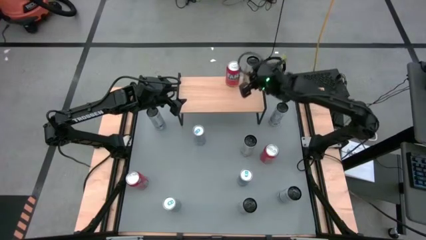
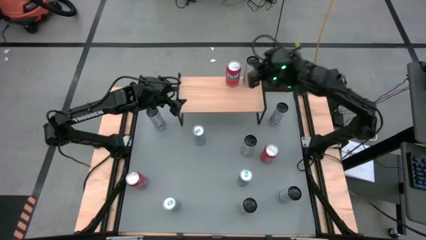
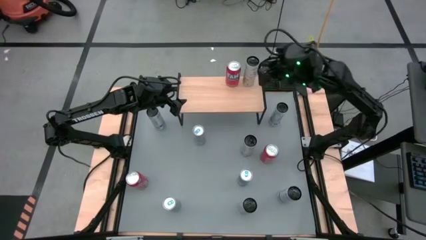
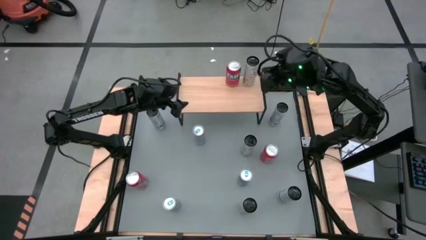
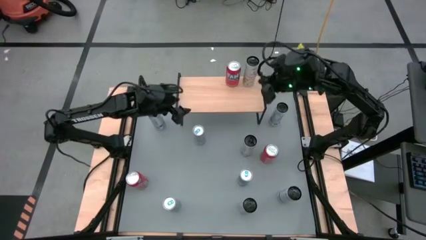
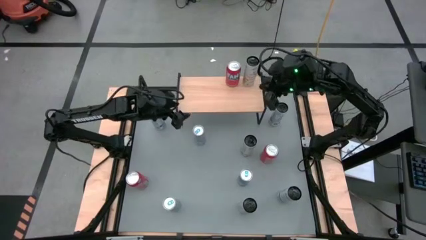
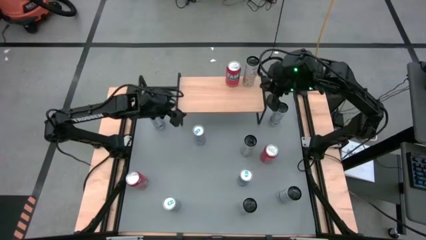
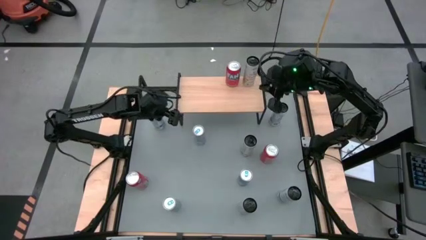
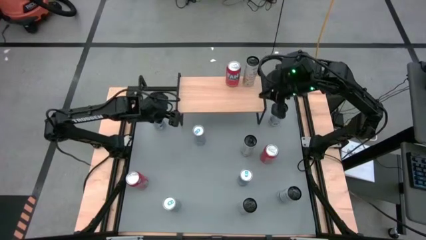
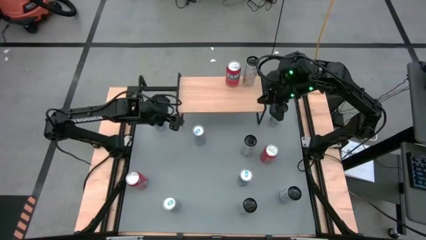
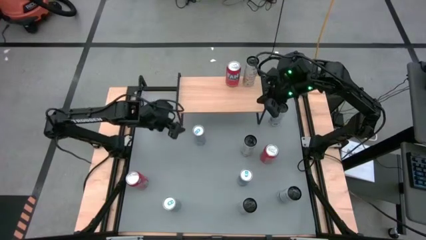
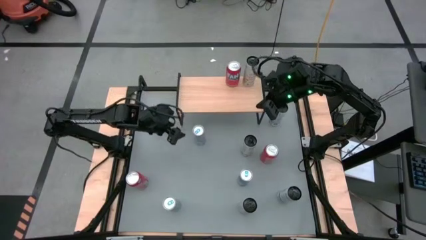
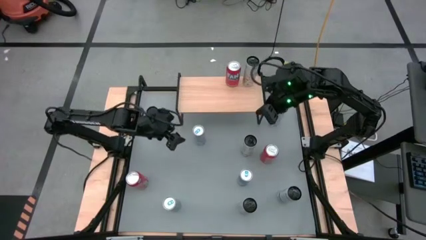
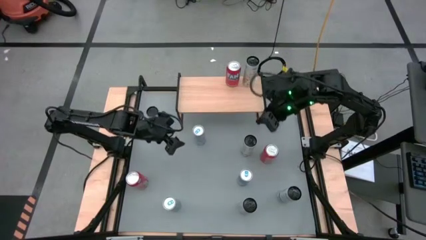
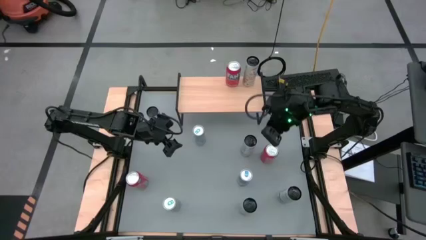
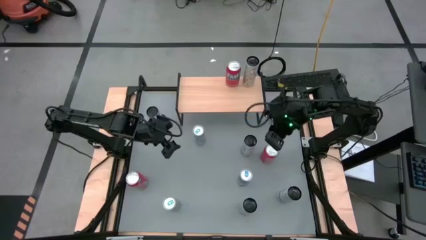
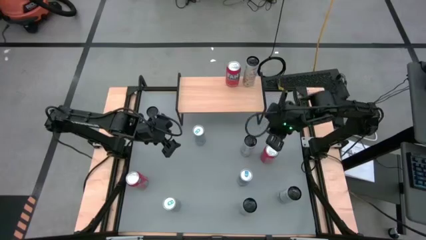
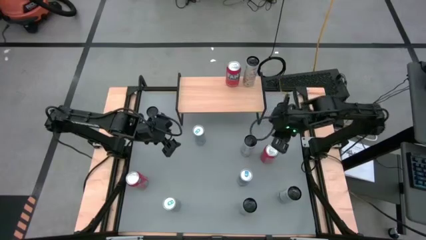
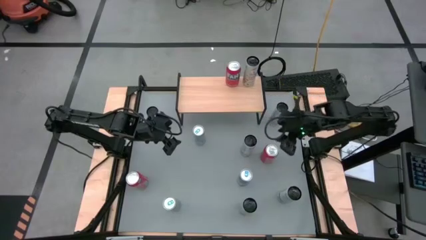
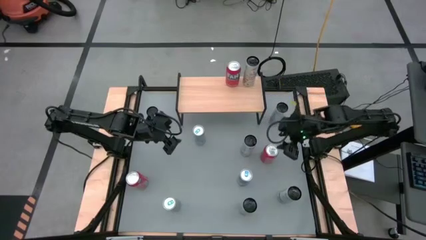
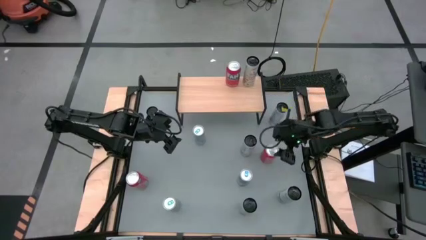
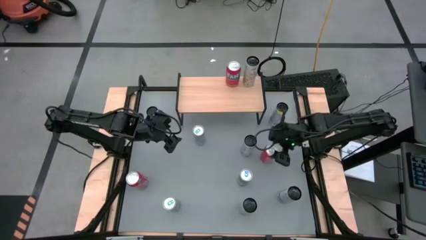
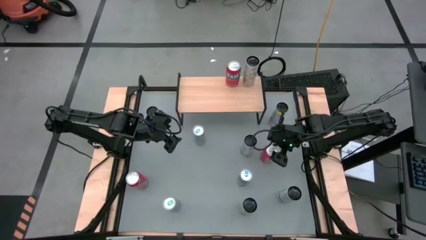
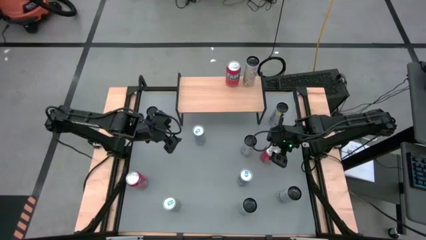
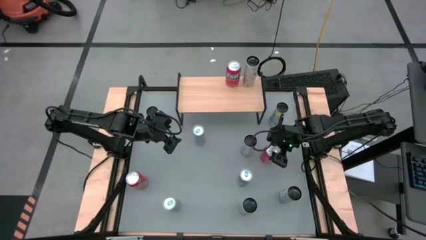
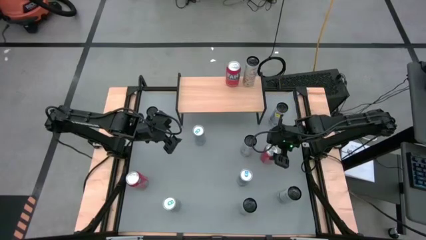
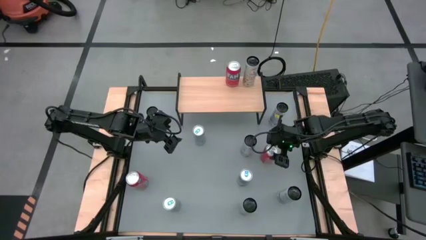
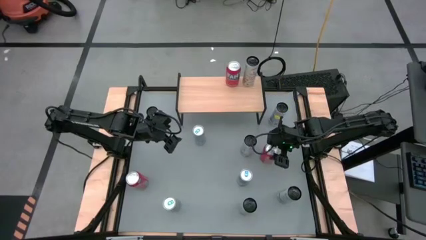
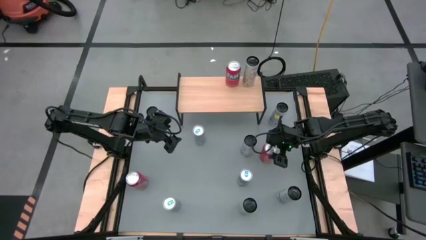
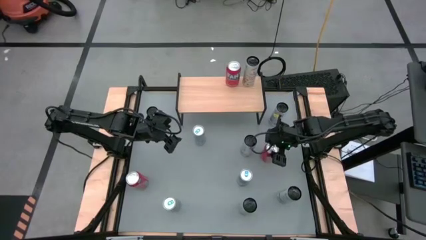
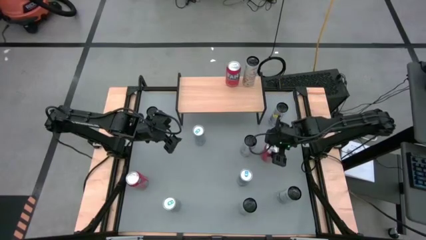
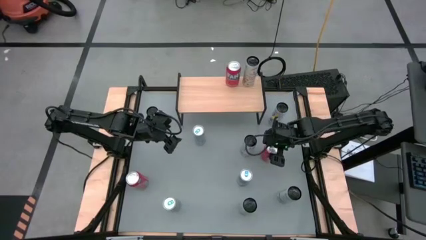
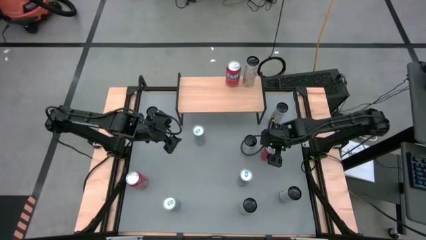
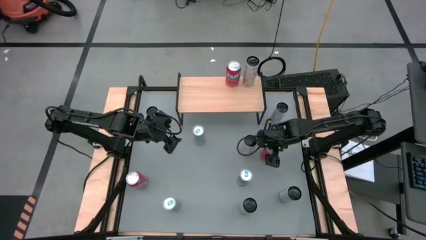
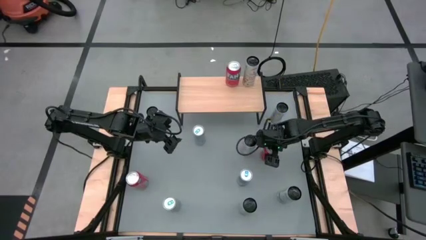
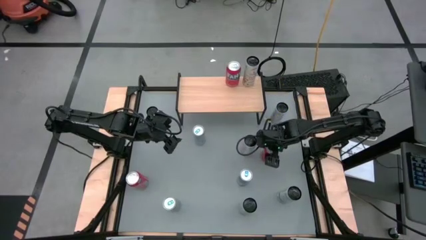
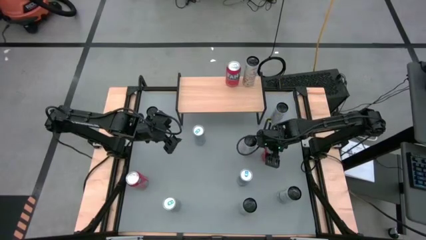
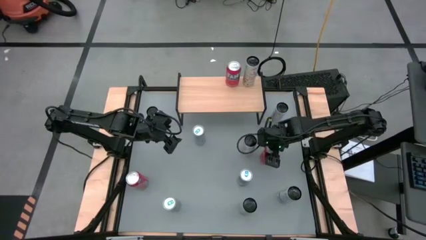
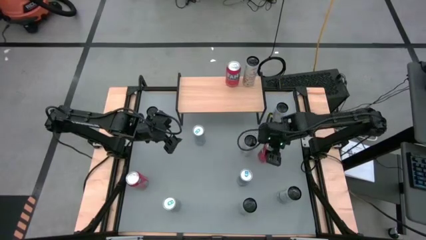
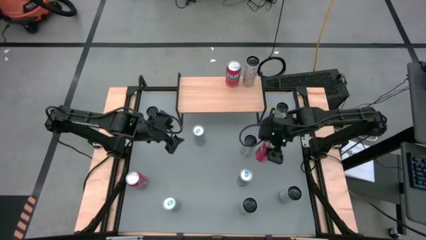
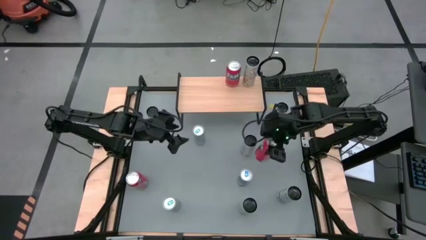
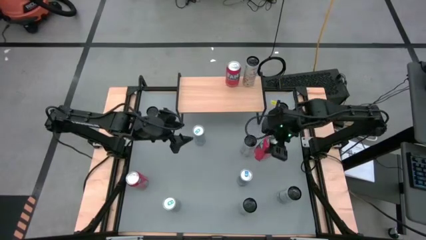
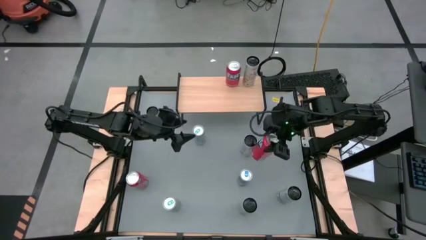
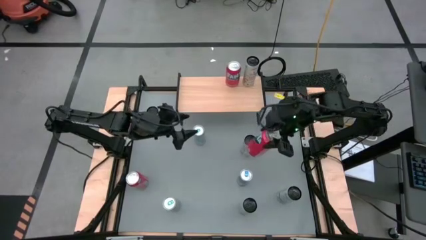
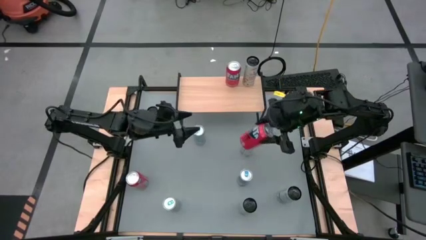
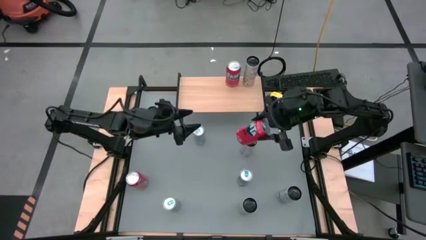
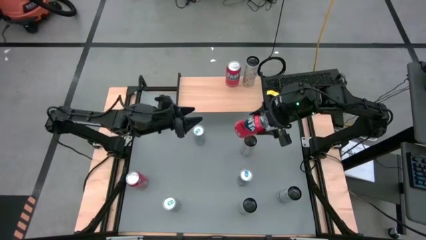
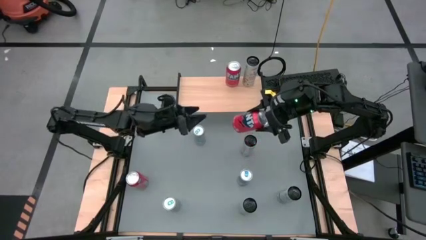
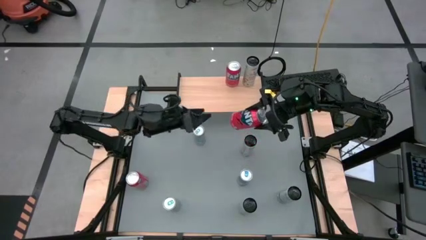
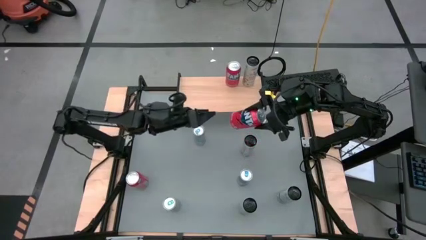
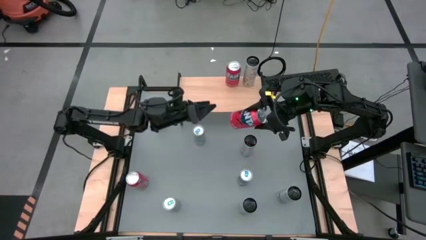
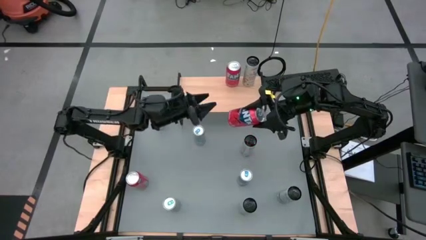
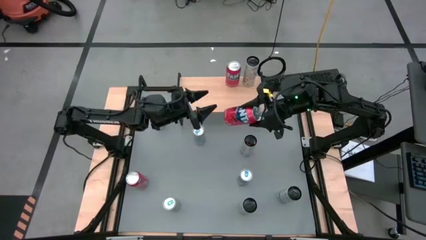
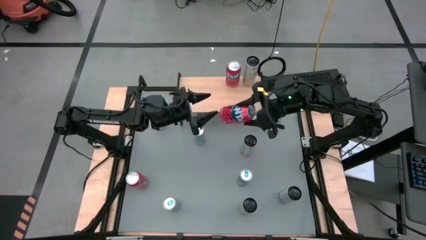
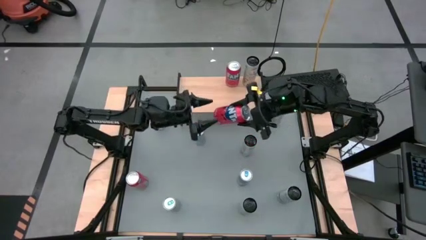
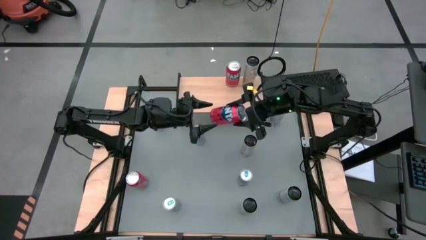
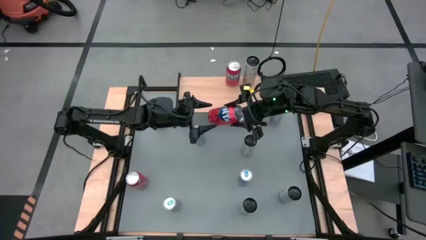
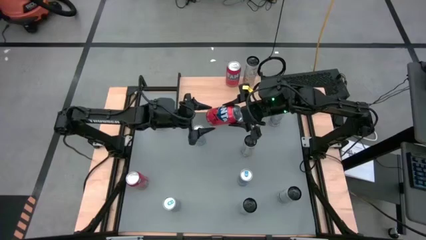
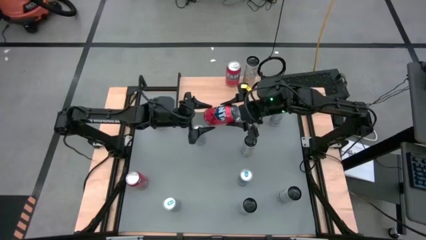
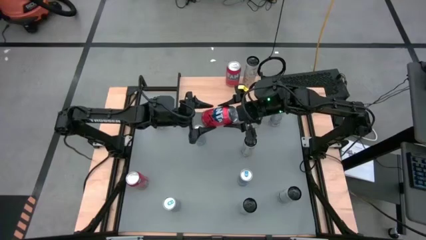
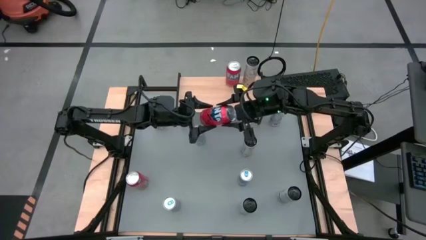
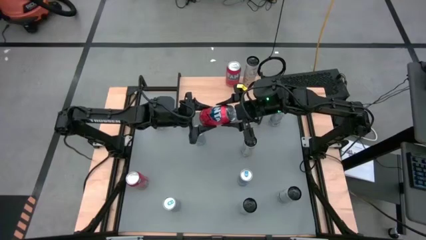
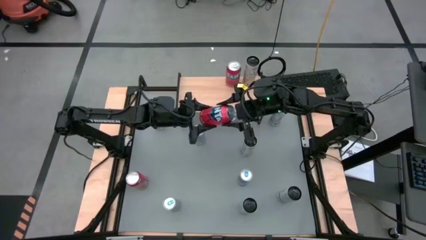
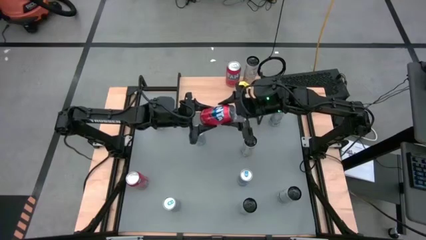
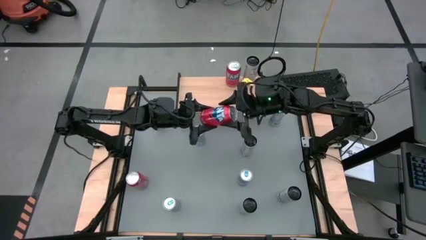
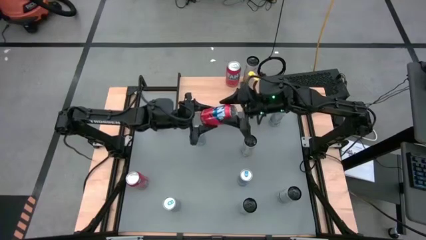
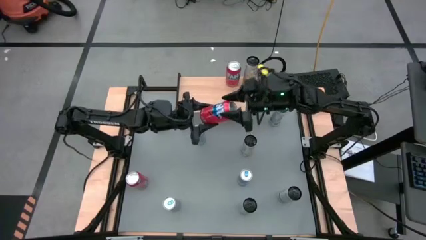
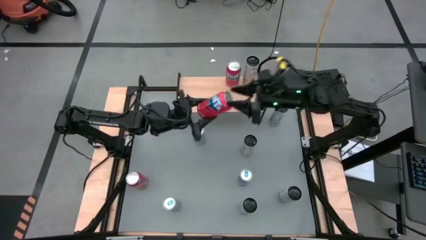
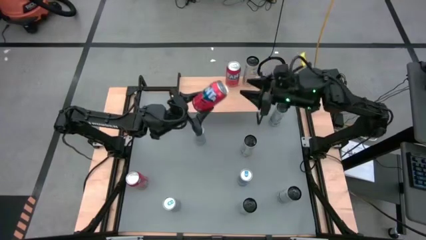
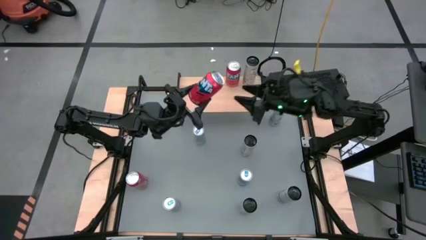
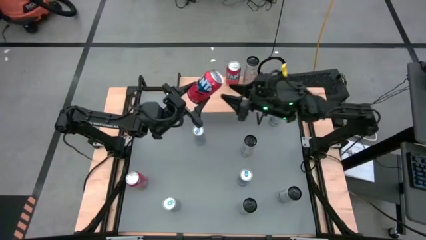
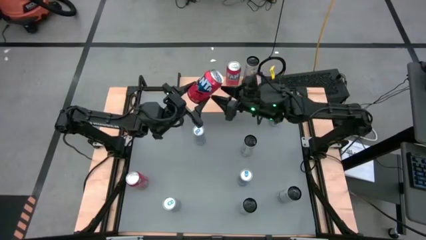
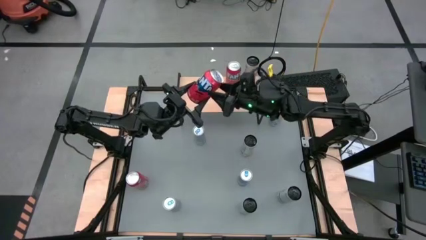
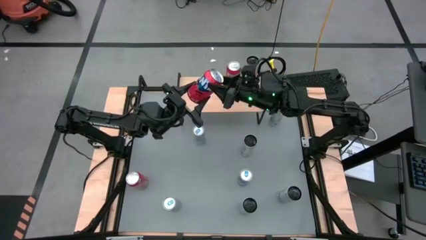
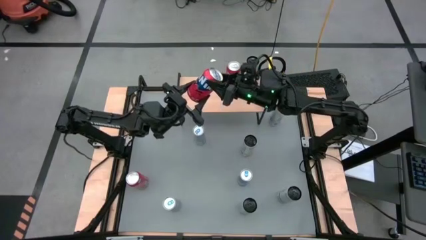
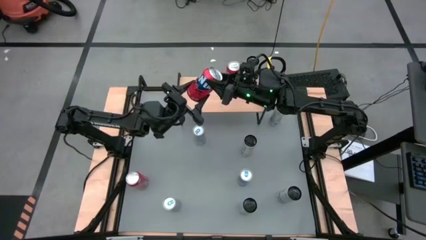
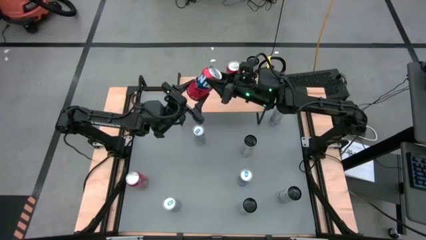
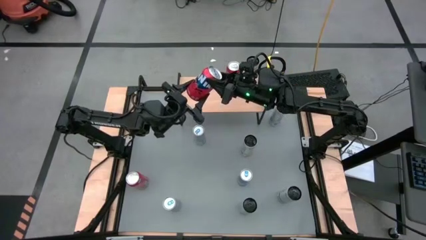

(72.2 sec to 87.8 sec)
Task: Place canned beverage on shelf
Put the right orange soda can on the shelf aligned with the other orange soda can

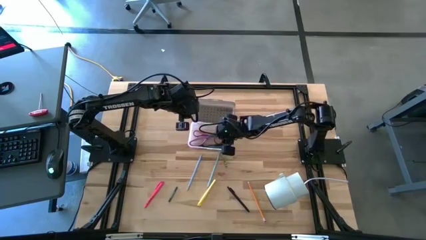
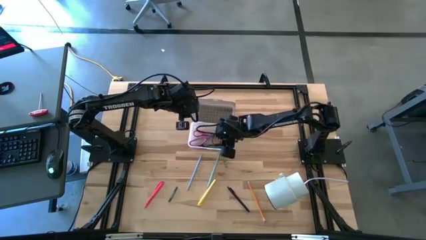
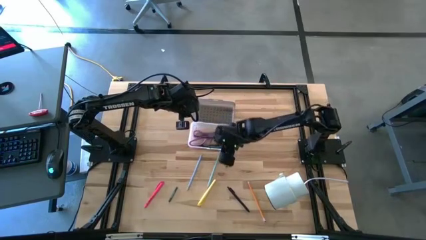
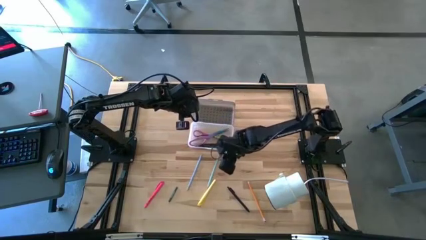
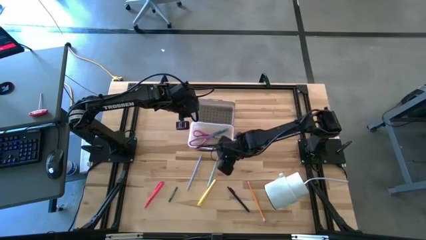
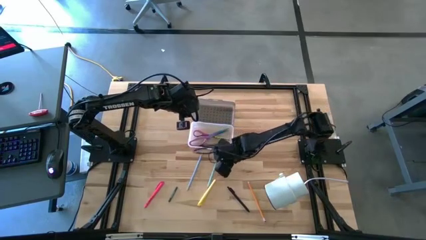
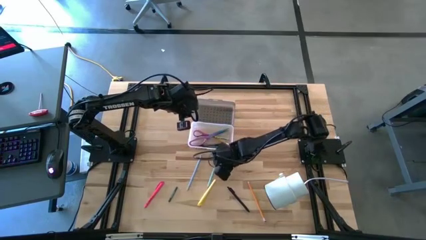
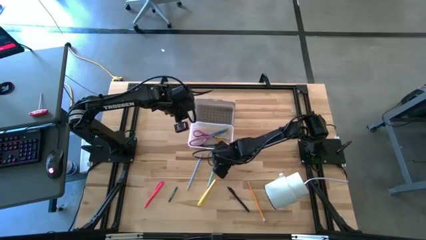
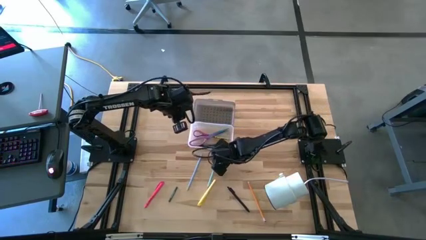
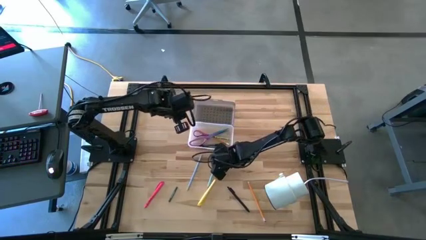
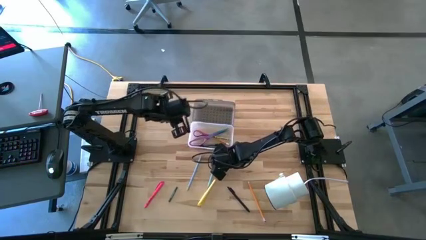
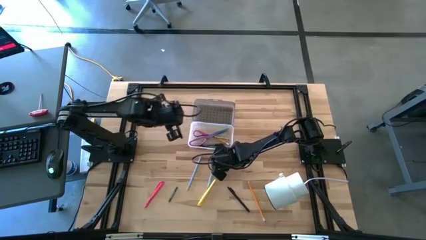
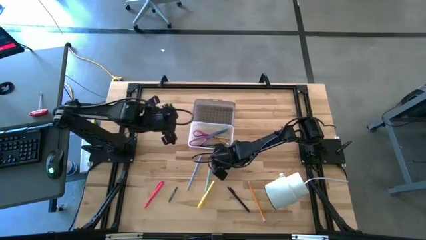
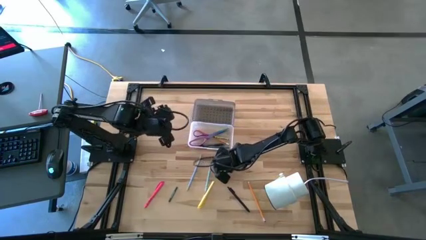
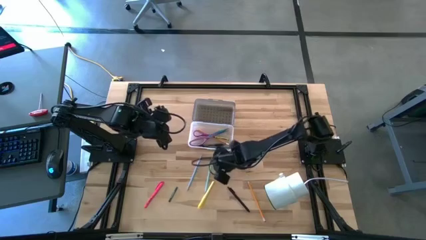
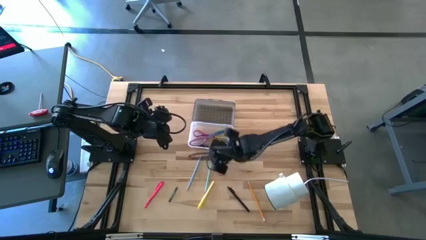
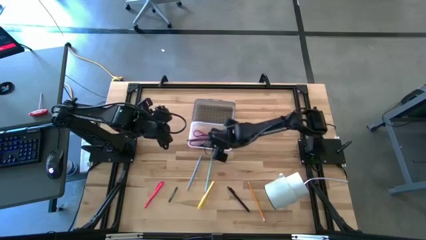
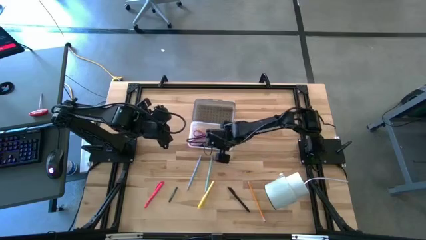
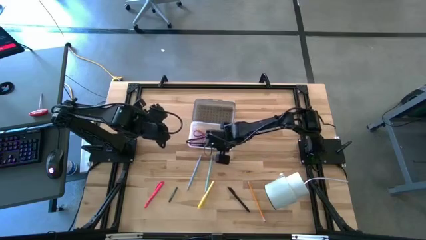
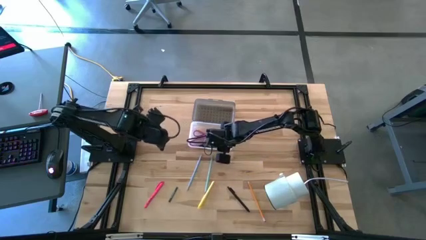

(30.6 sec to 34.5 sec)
Task: Pick & place school supplies into a supply box
Put the green crayon into the black supply box
